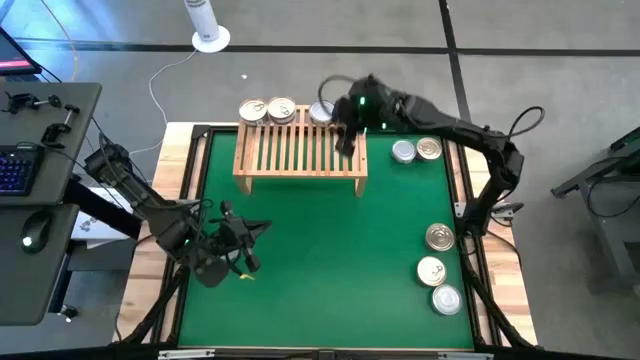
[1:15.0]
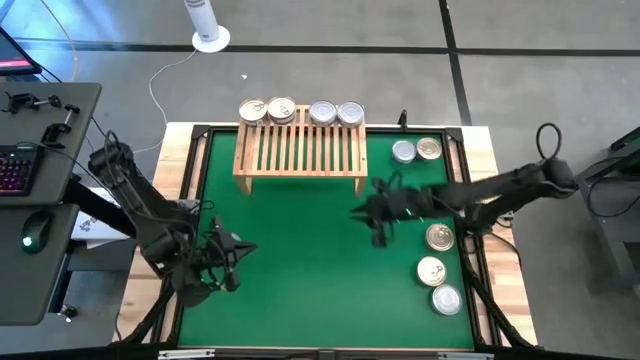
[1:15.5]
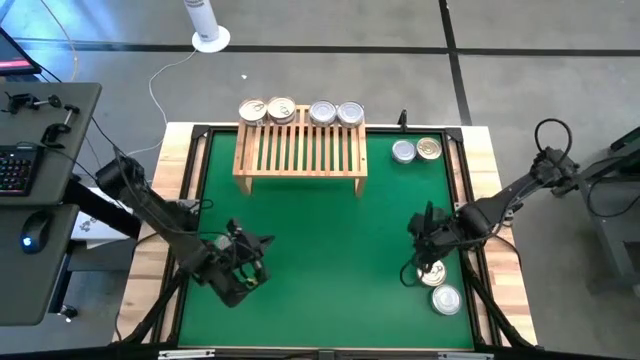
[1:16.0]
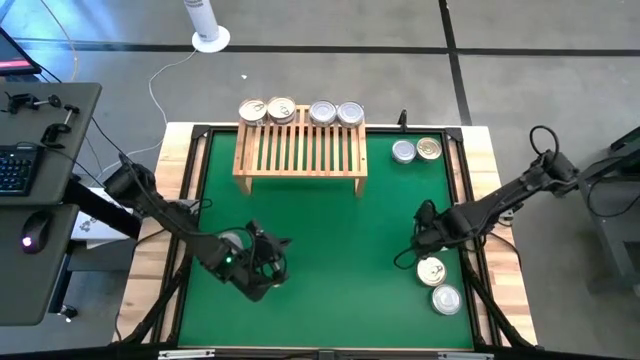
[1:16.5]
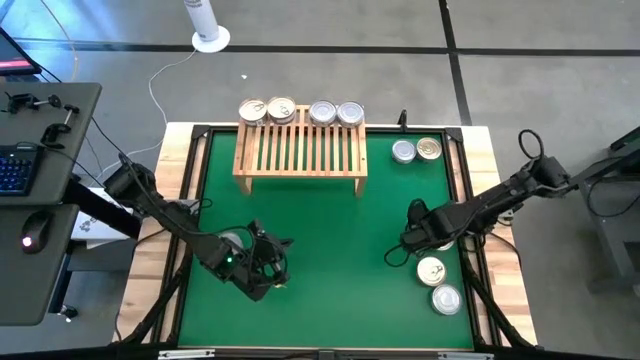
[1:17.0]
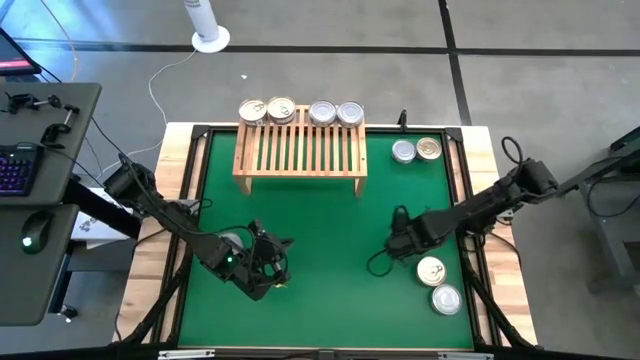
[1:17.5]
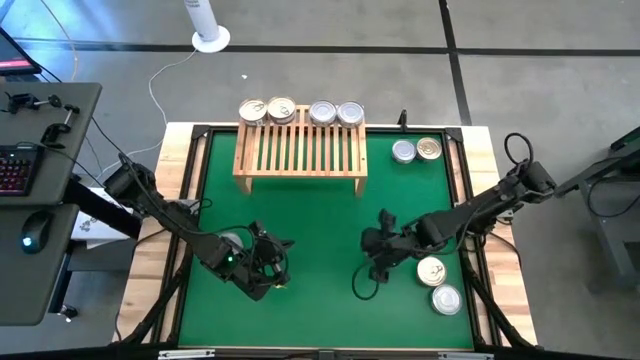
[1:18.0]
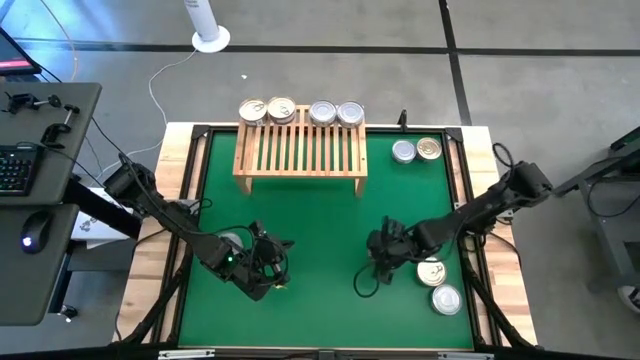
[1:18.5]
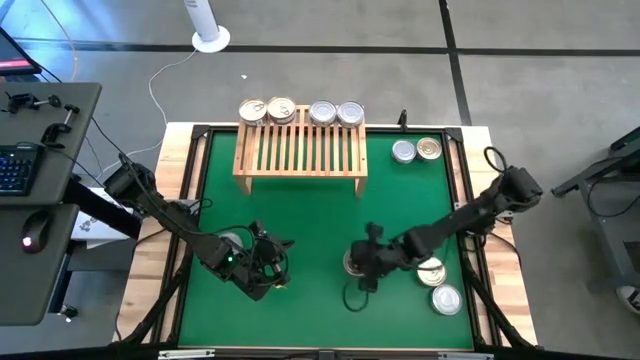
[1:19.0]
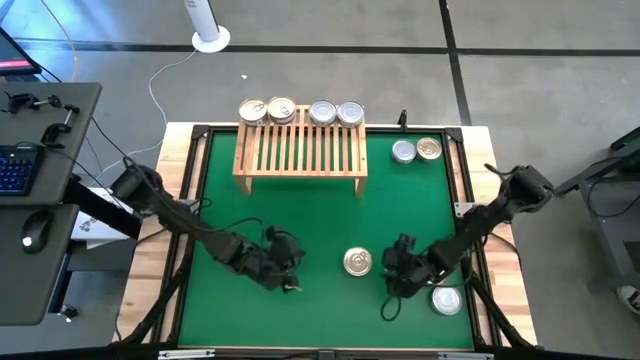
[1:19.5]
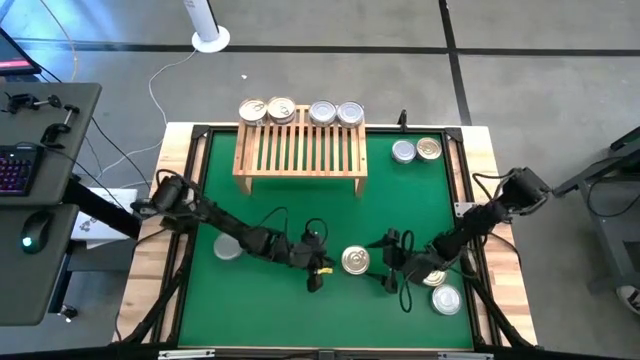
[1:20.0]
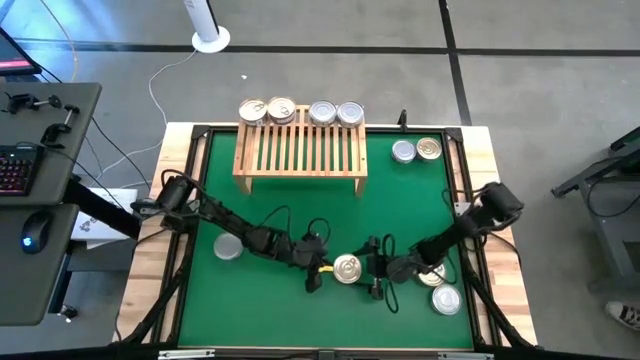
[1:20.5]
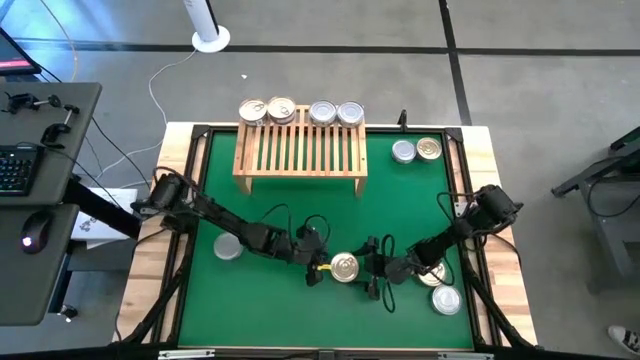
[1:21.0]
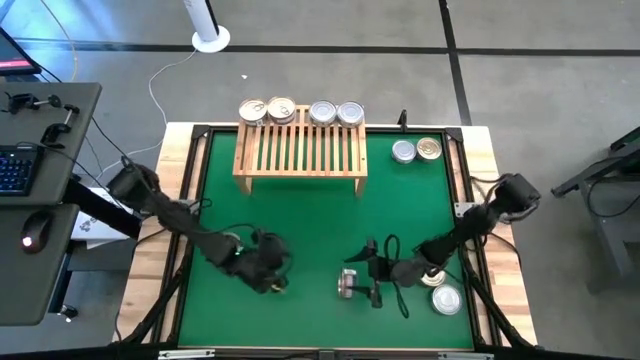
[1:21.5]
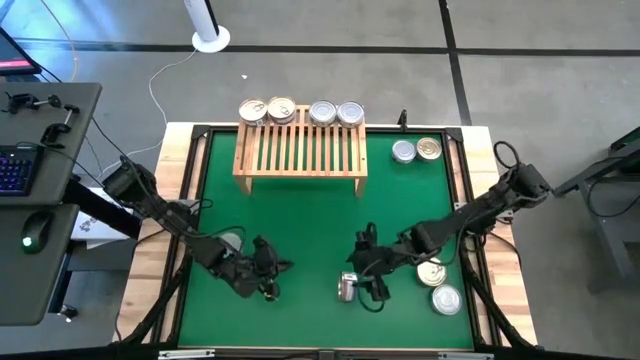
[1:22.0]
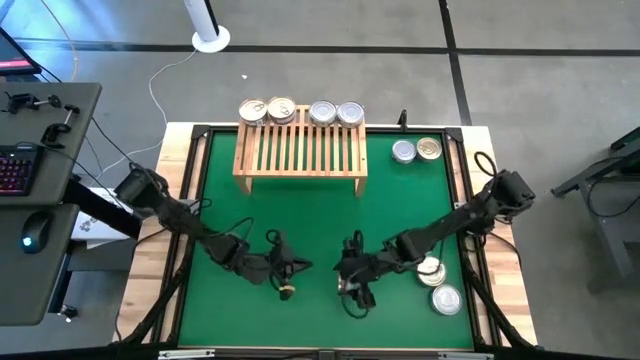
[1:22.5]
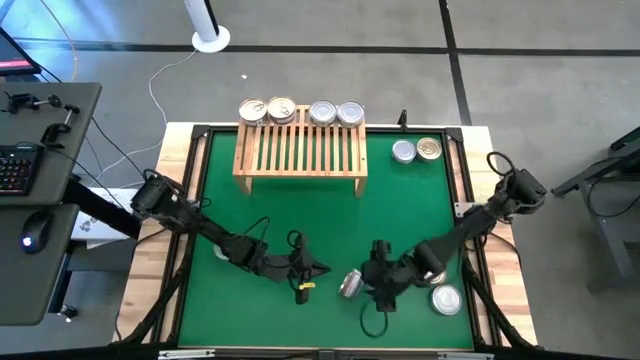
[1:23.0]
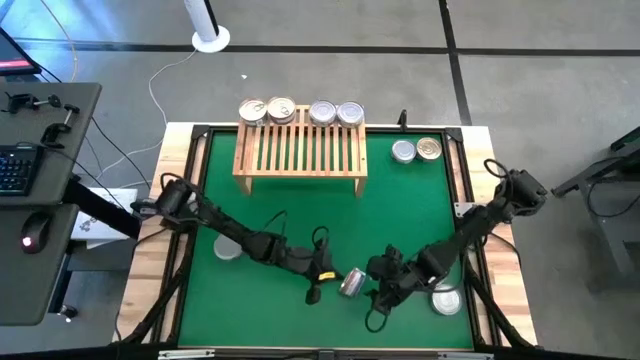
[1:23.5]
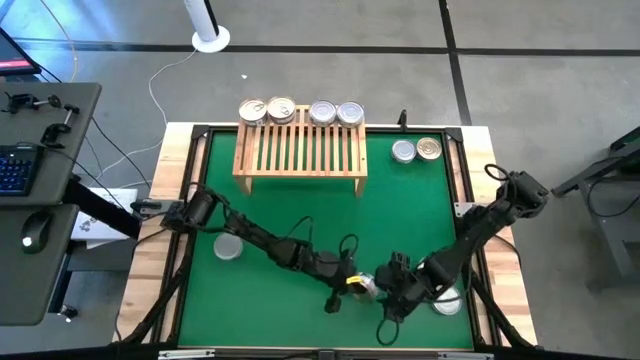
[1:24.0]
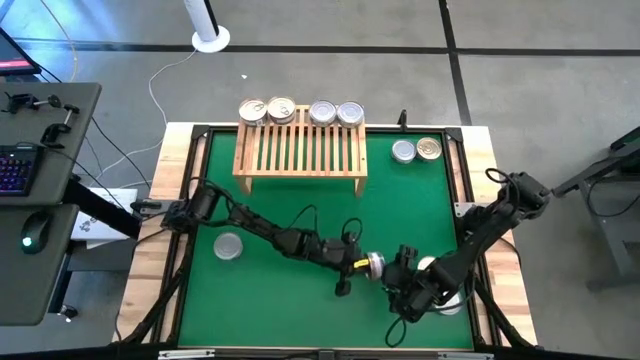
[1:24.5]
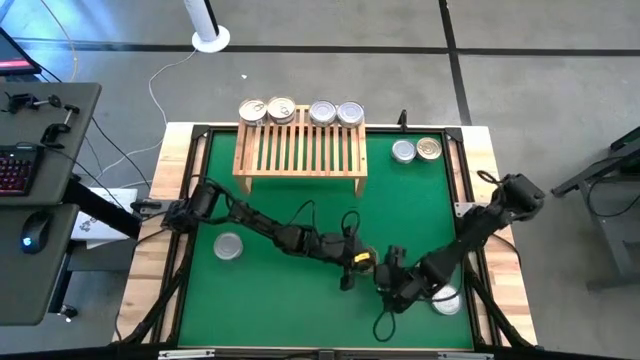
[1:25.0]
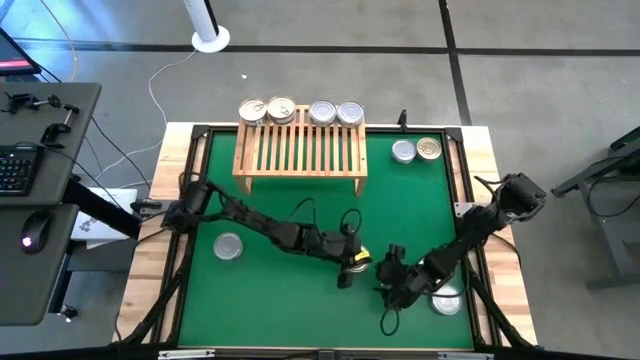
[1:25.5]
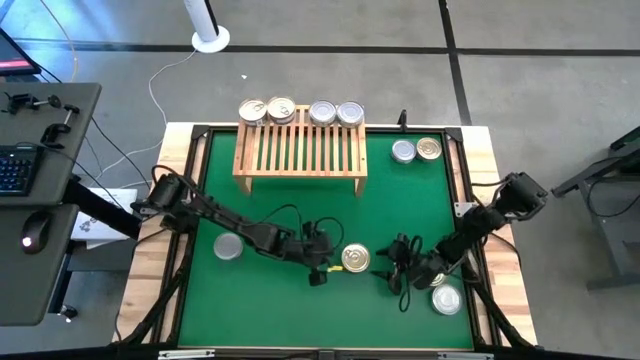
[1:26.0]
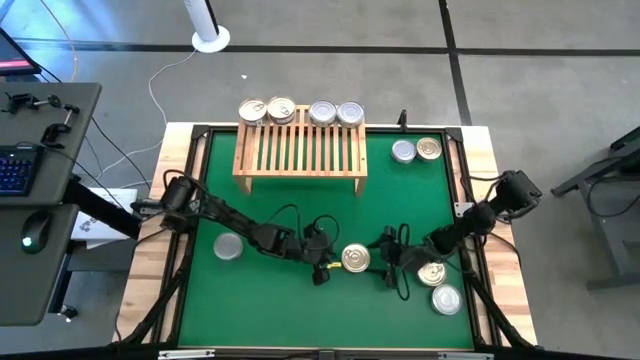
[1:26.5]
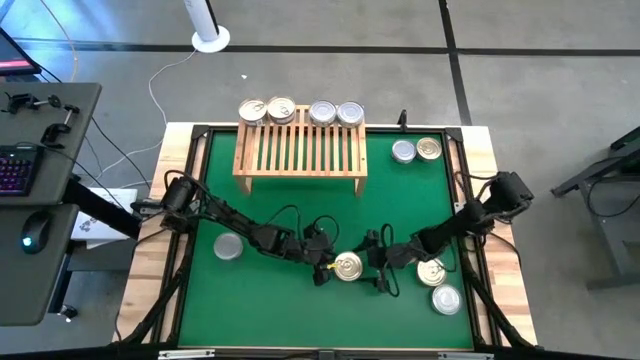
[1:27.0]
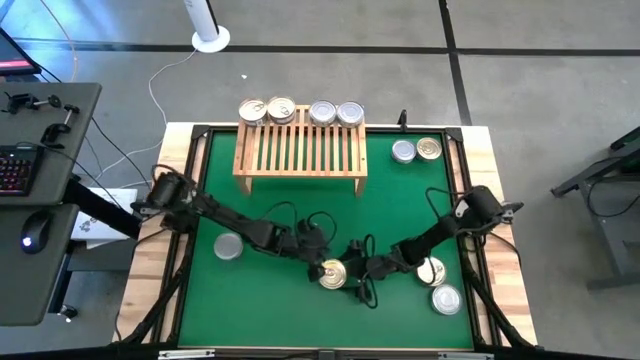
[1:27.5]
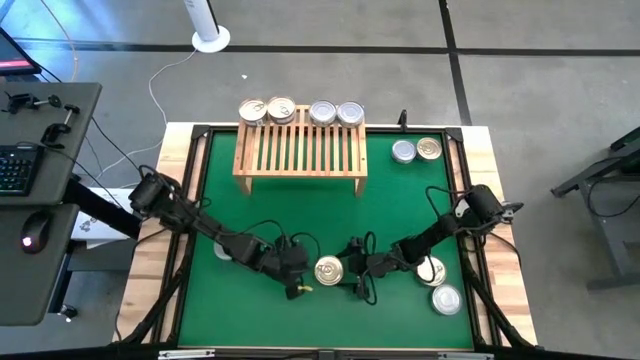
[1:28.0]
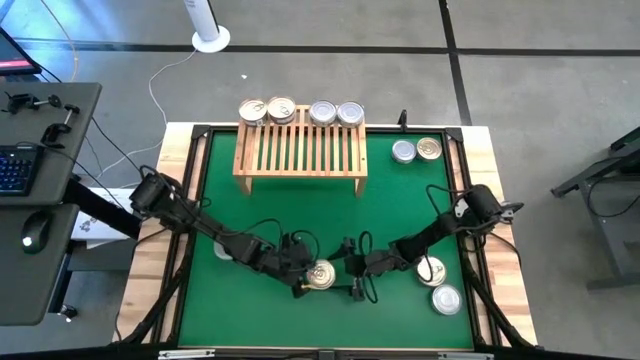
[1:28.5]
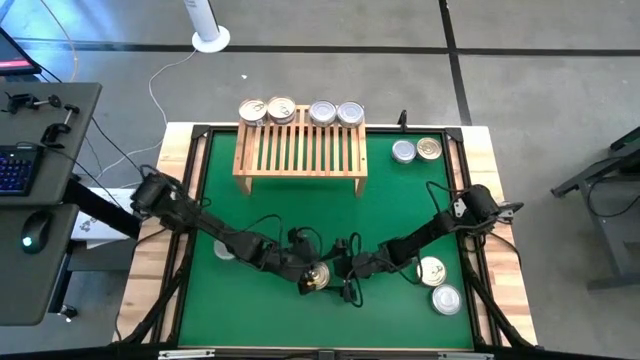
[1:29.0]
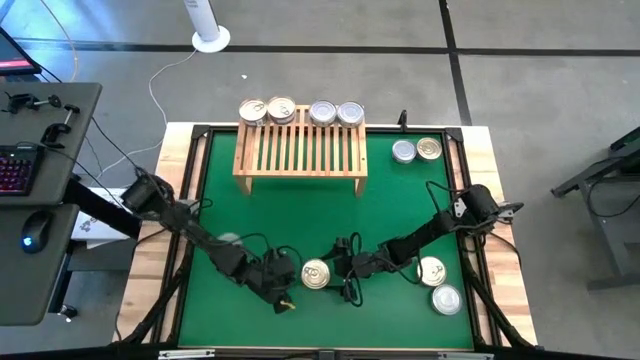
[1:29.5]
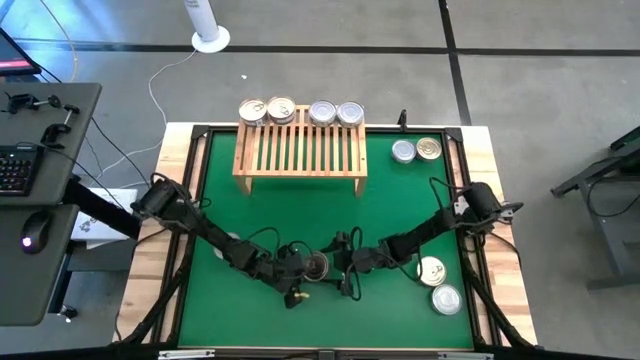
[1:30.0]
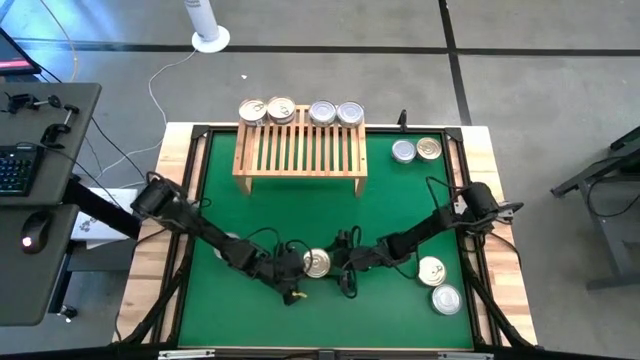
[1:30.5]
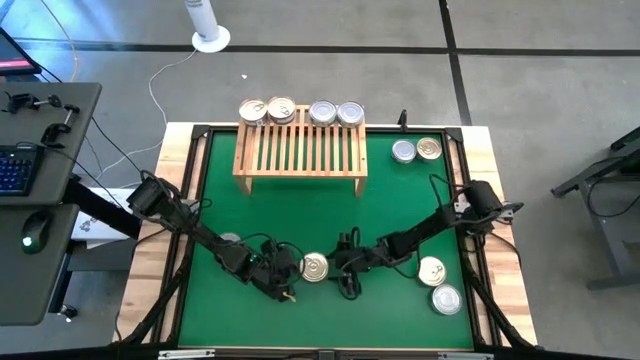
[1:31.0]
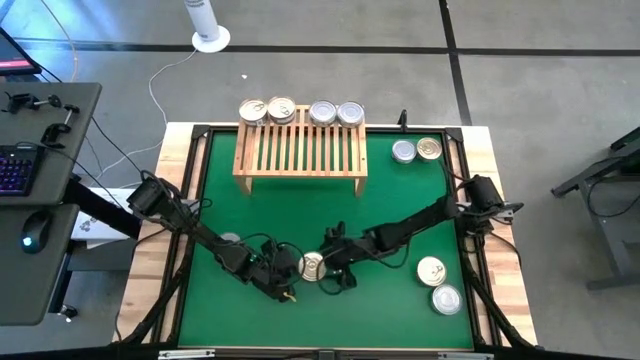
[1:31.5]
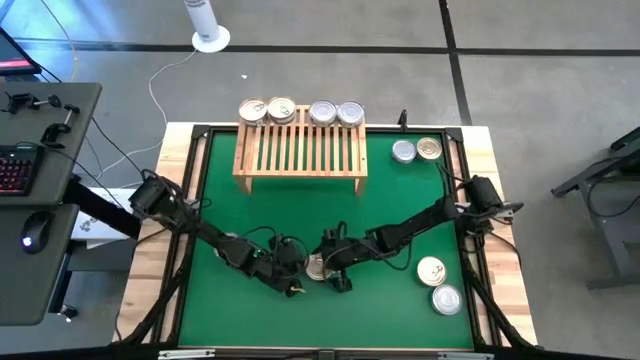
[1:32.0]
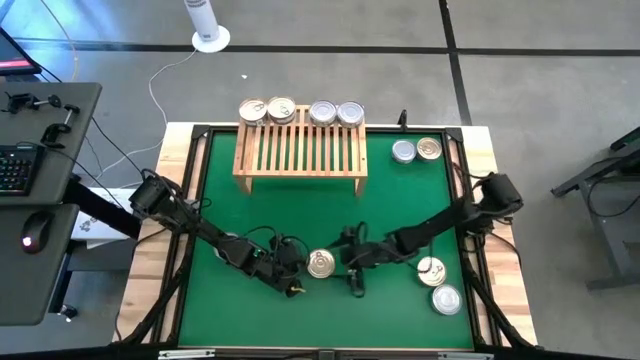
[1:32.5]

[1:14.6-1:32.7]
Task: Stack canned seafood by type on shelf
Stack the blue pink tuna can on top of the right blue pink tuna can on the shelf

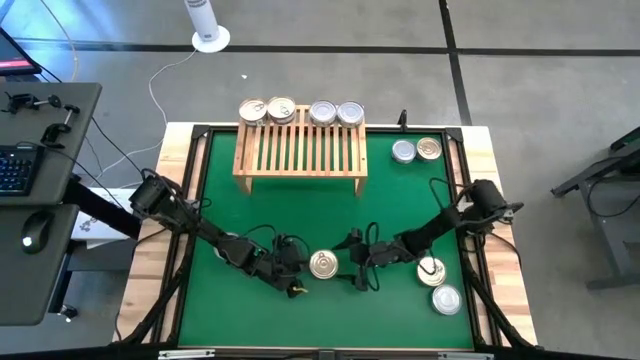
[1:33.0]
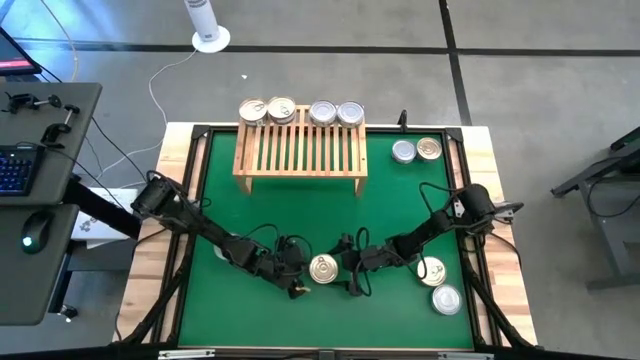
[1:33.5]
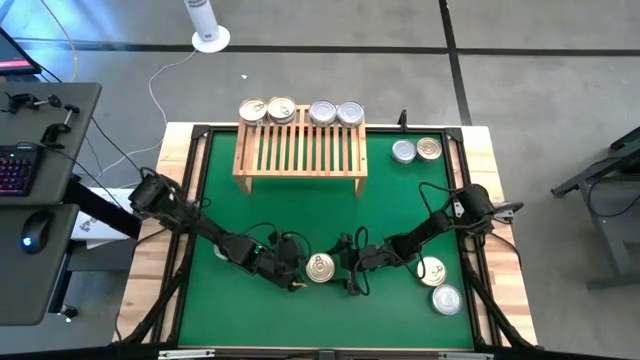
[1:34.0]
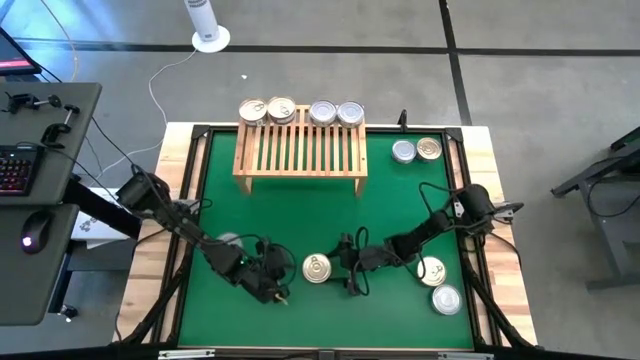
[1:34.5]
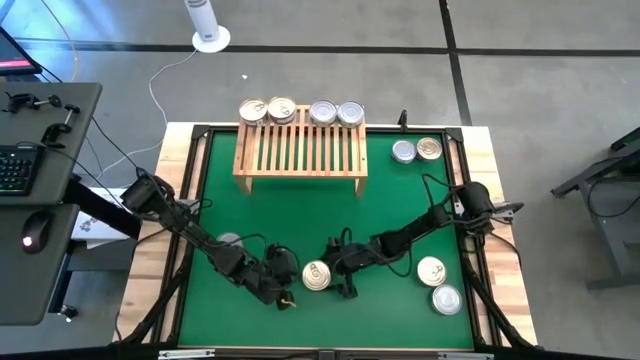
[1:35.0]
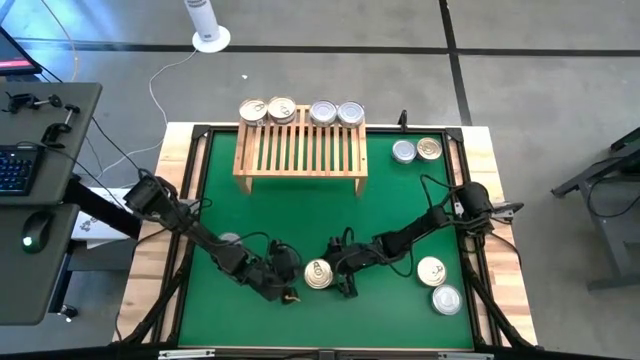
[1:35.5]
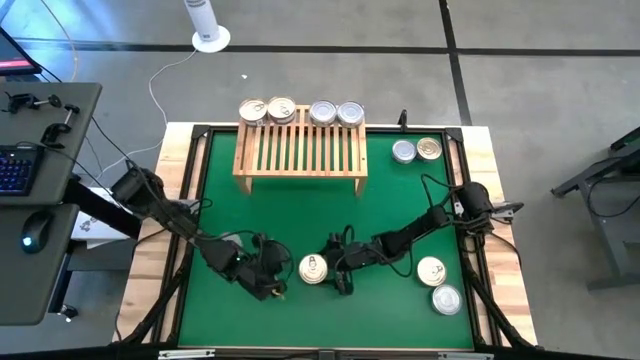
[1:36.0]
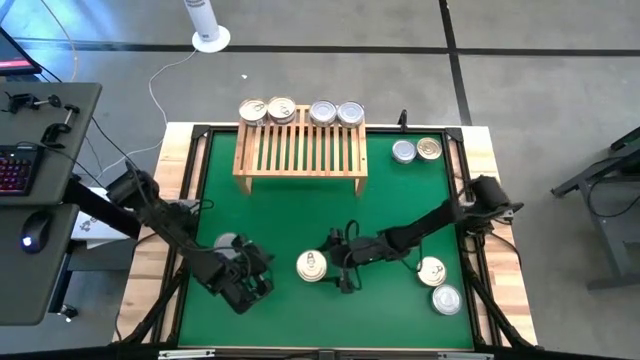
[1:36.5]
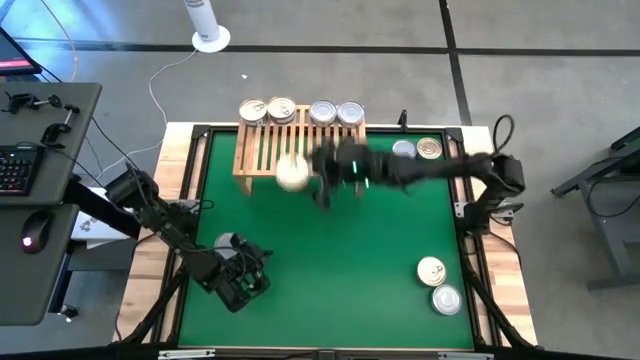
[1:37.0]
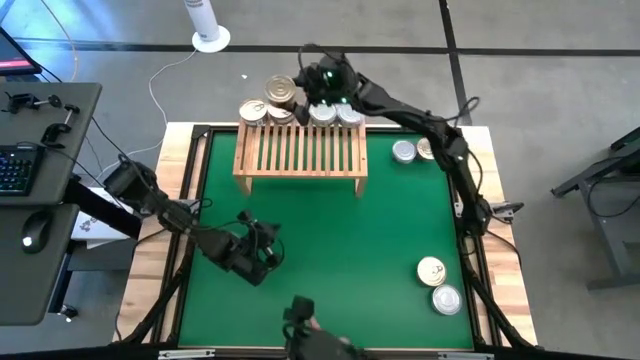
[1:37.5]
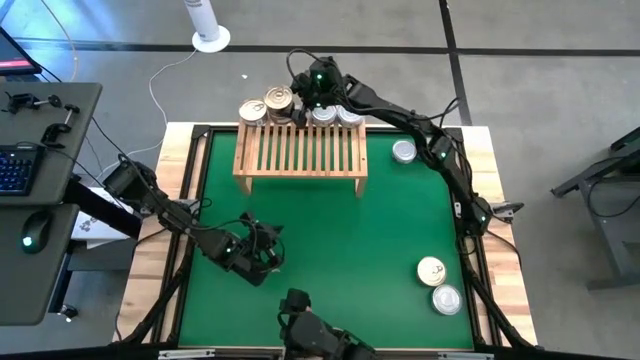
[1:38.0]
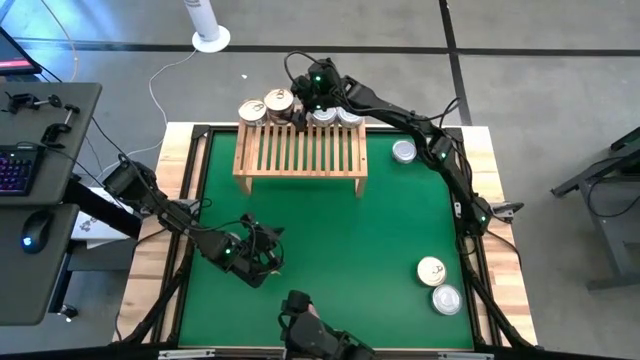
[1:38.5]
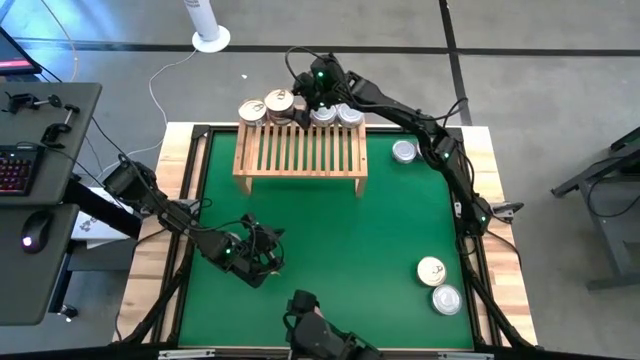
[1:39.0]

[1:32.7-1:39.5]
Stack the blue pink tuna can on top of the right blue pink tuna can on the shelf
